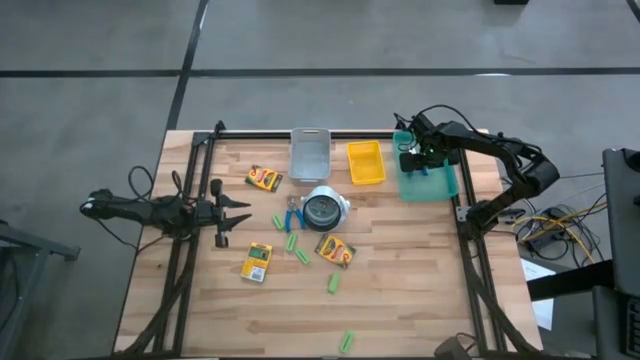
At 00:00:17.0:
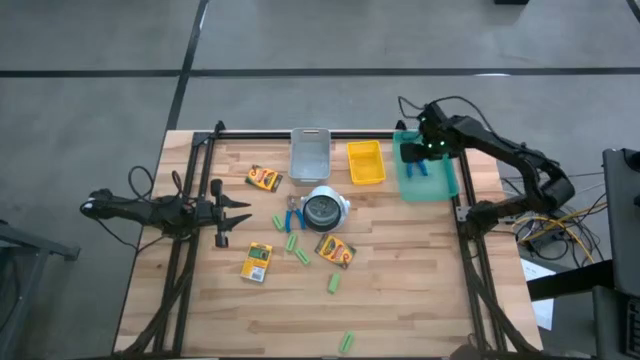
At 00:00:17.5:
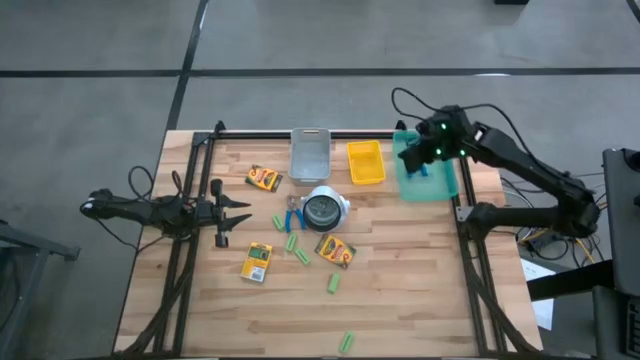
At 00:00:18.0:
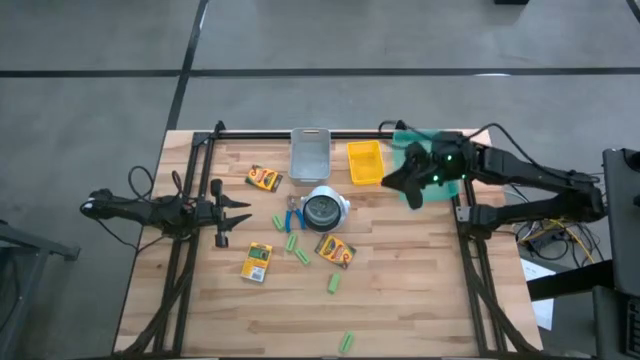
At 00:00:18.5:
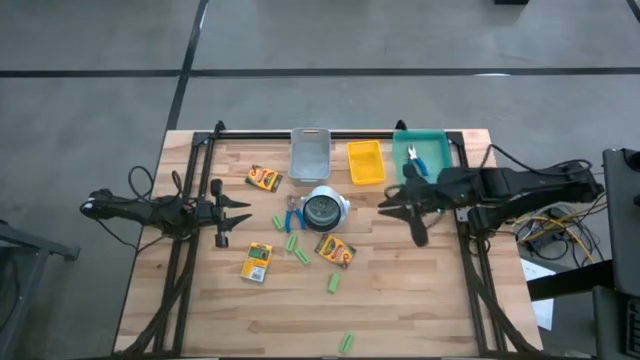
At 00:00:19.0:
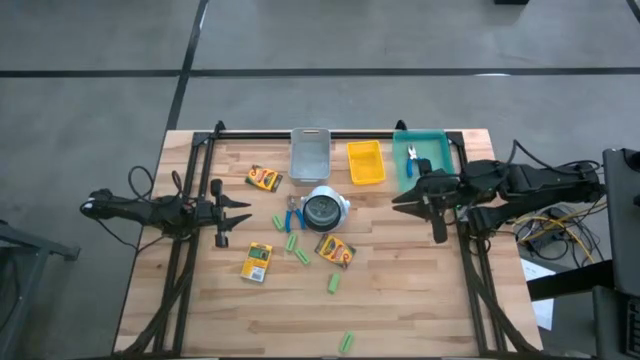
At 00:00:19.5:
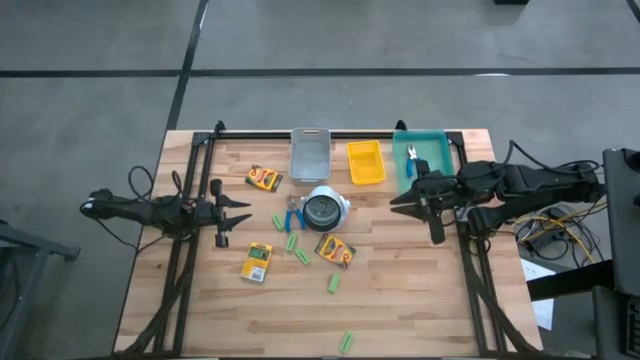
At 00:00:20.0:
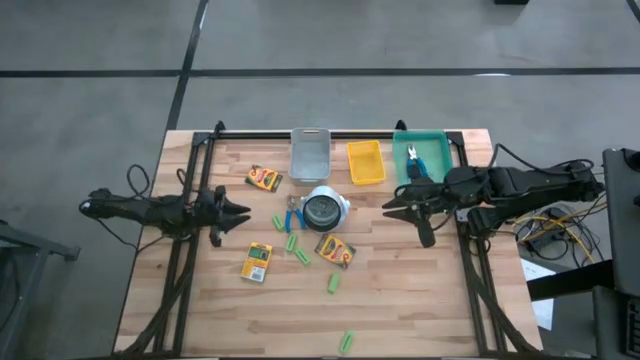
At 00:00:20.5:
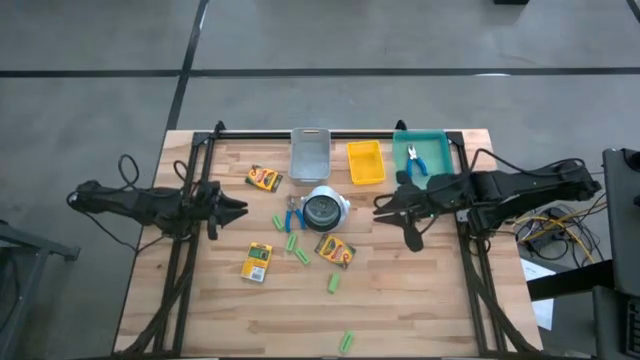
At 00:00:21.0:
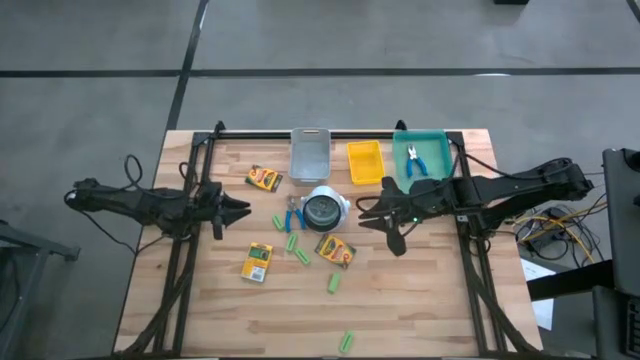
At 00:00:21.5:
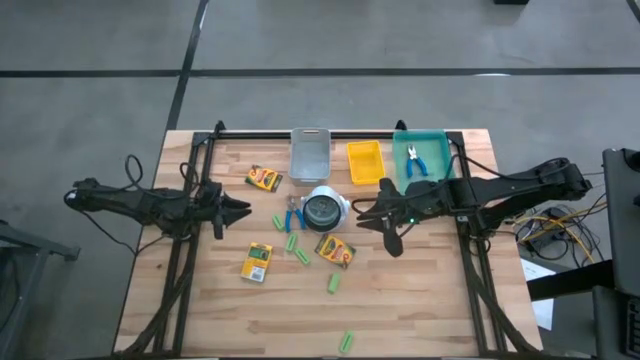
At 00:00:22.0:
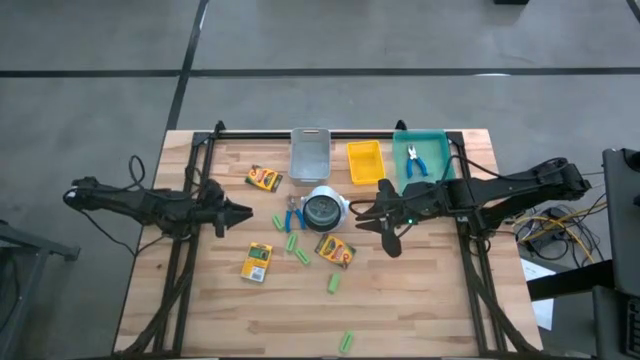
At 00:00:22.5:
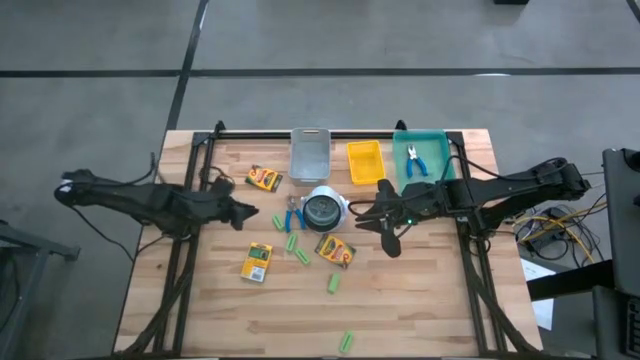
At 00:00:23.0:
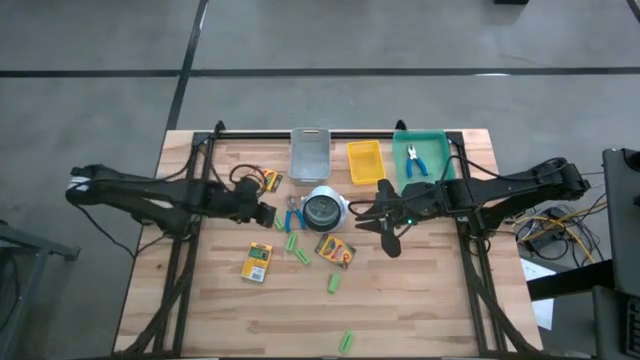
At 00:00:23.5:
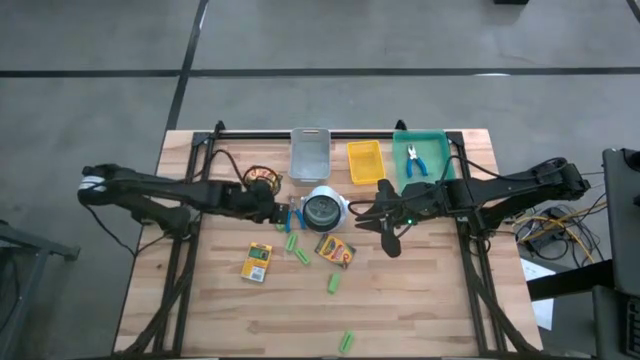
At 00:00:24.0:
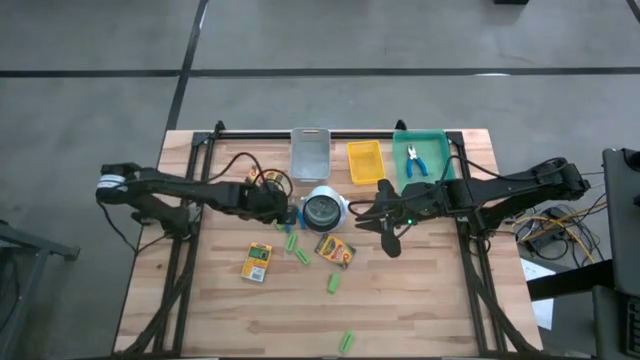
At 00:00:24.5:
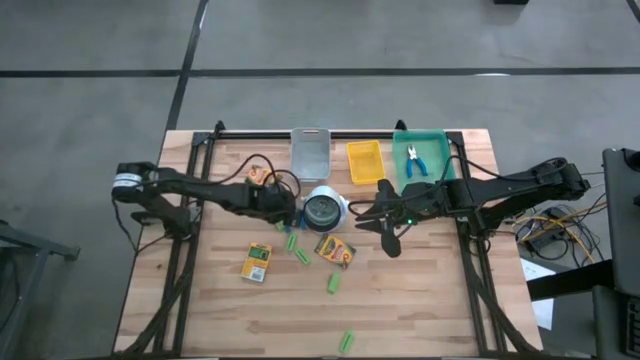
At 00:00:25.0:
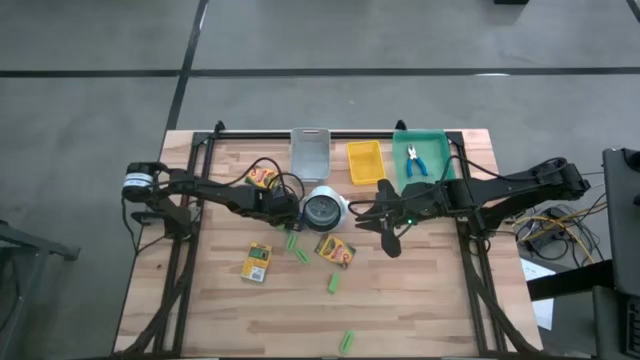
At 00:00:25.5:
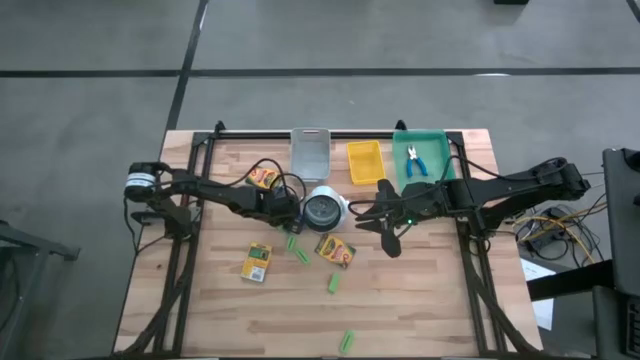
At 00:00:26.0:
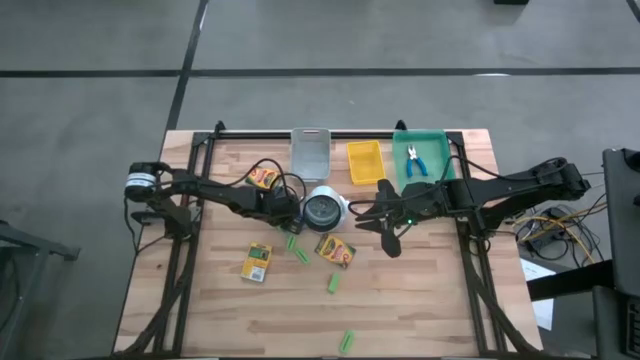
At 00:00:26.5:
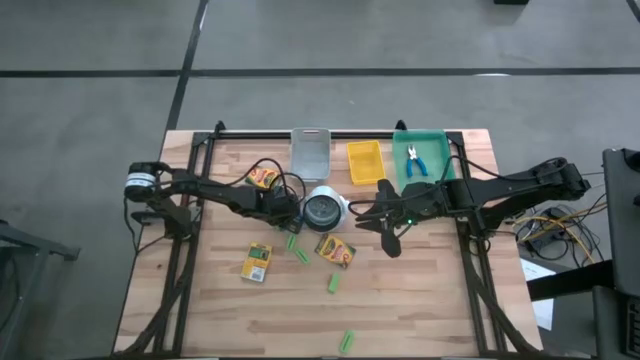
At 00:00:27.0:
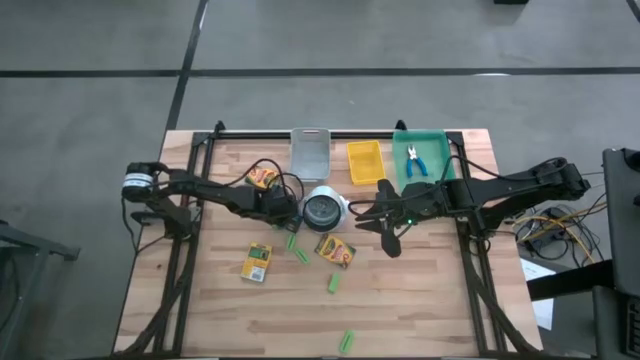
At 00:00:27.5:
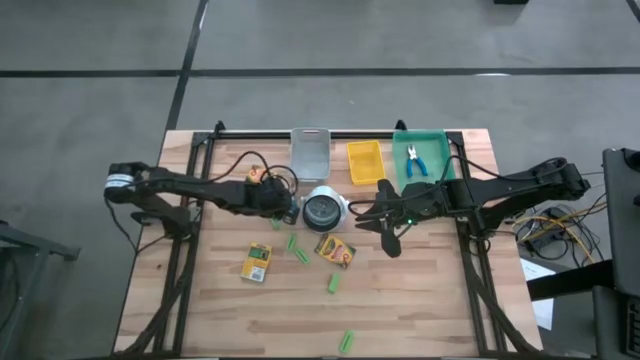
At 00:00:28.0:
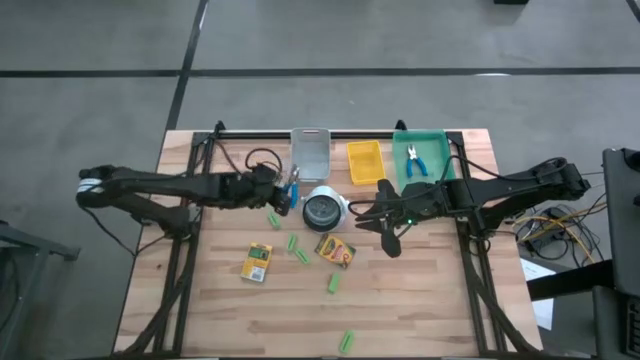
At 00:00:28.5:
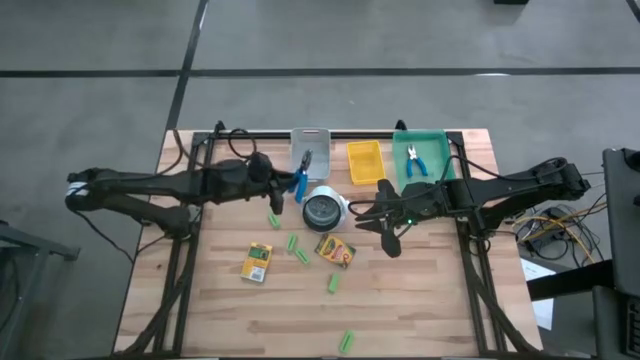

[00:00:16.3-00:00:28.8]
Task: Pick & Place School Supplies
Put the blue punch plier into the green bin
